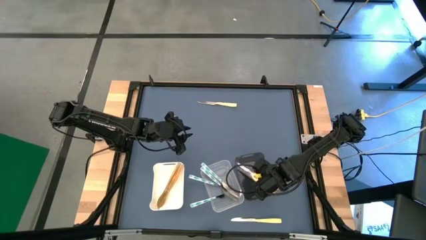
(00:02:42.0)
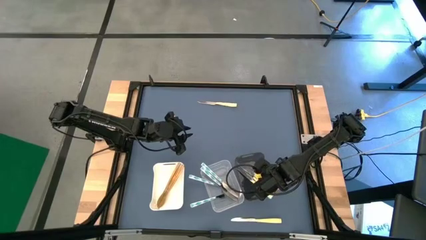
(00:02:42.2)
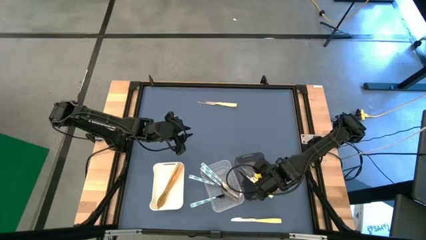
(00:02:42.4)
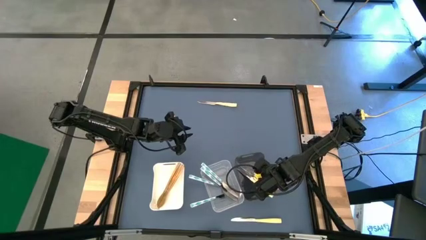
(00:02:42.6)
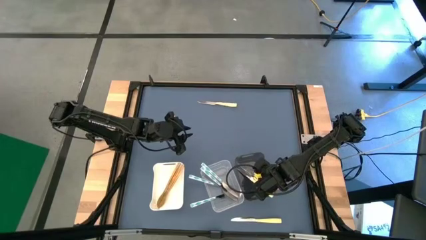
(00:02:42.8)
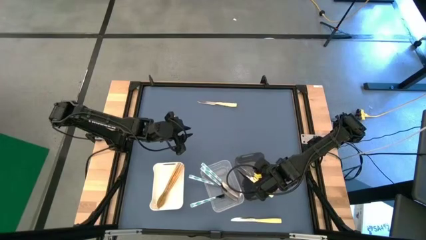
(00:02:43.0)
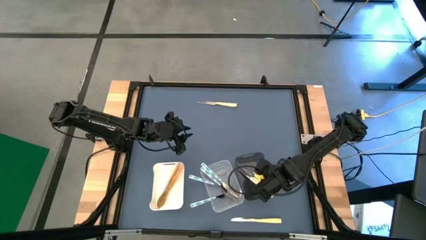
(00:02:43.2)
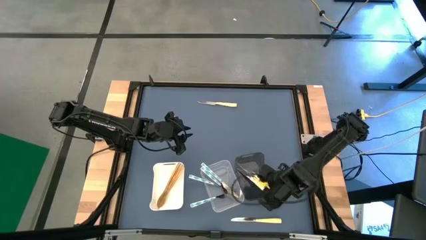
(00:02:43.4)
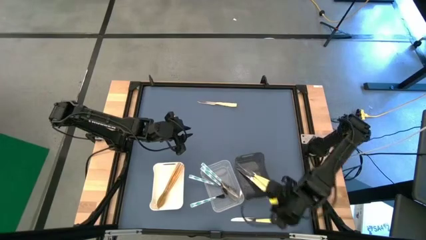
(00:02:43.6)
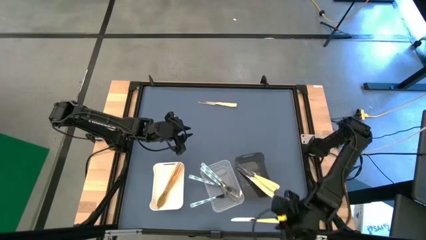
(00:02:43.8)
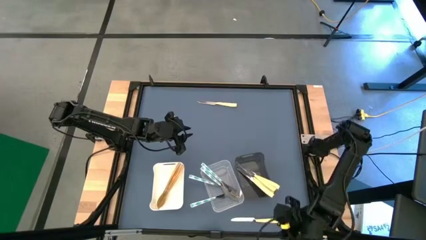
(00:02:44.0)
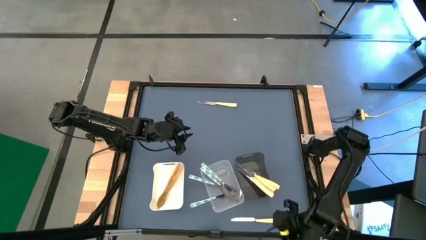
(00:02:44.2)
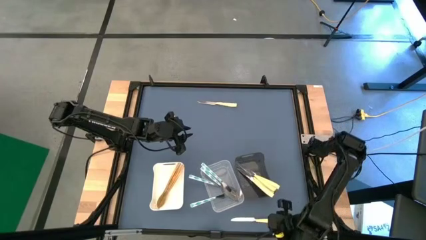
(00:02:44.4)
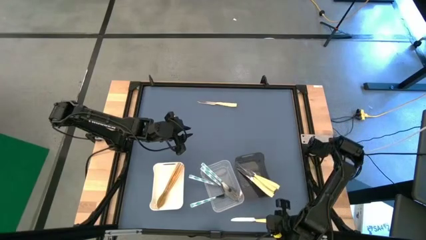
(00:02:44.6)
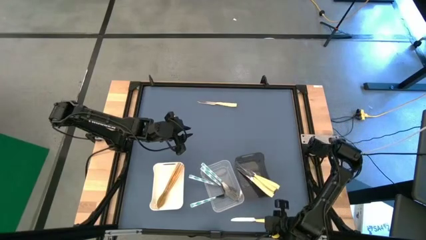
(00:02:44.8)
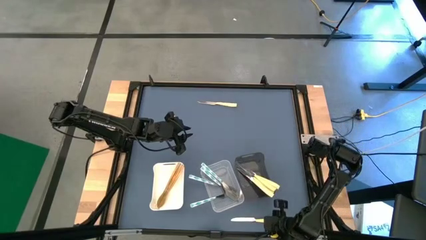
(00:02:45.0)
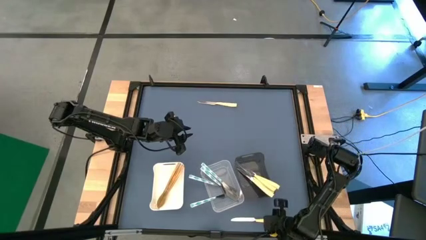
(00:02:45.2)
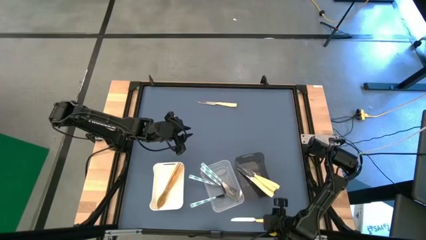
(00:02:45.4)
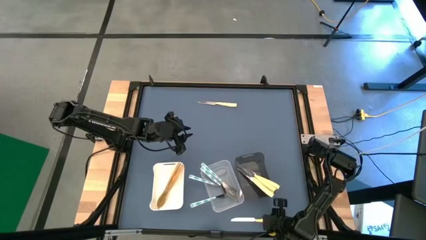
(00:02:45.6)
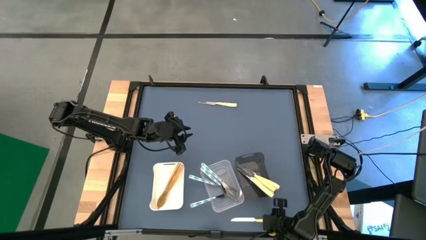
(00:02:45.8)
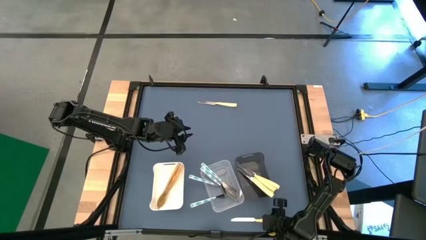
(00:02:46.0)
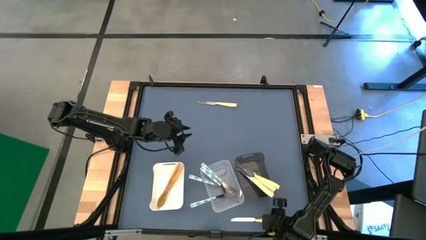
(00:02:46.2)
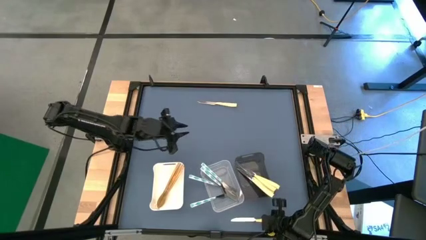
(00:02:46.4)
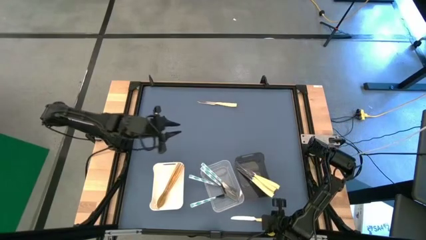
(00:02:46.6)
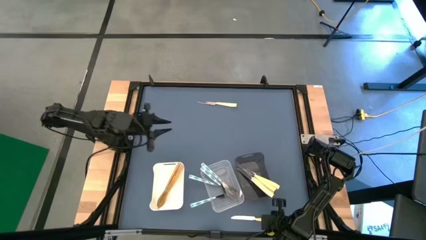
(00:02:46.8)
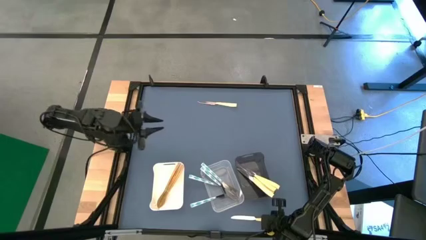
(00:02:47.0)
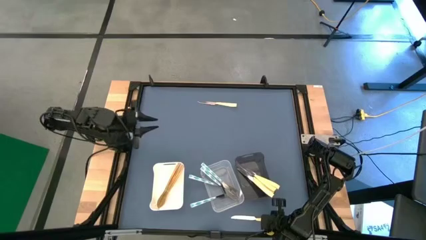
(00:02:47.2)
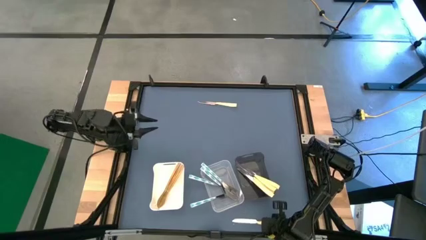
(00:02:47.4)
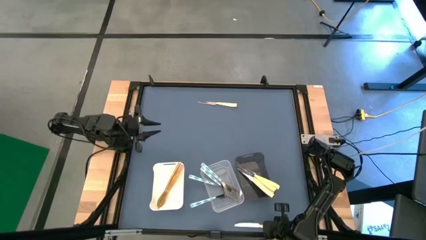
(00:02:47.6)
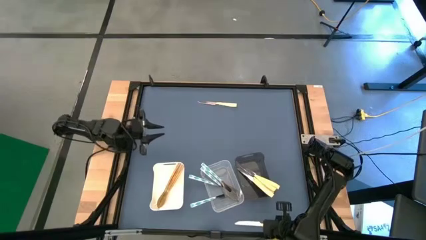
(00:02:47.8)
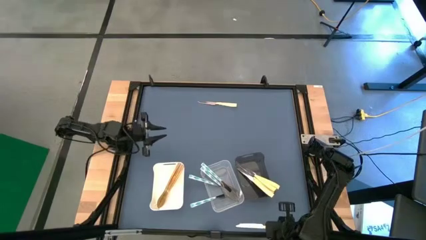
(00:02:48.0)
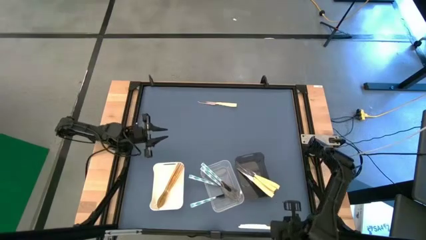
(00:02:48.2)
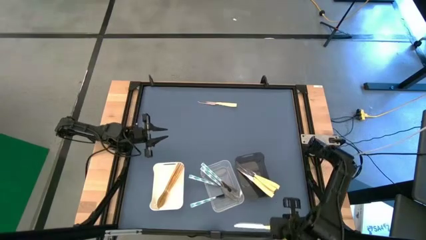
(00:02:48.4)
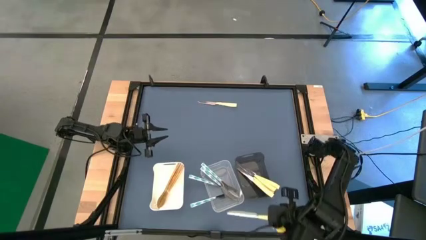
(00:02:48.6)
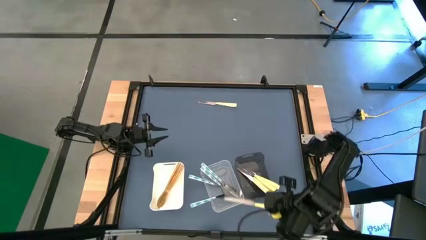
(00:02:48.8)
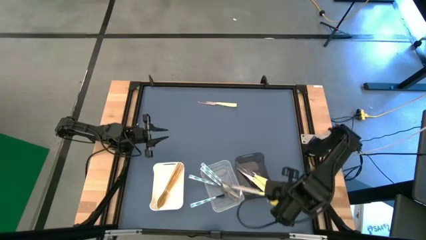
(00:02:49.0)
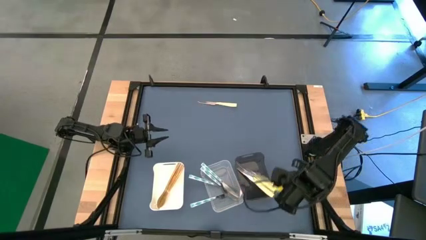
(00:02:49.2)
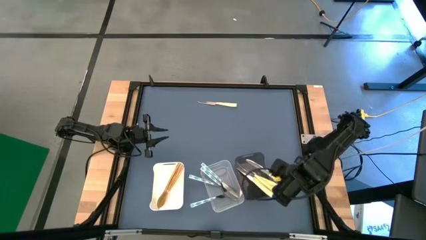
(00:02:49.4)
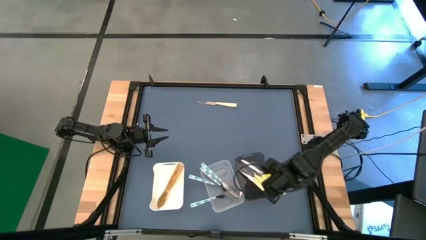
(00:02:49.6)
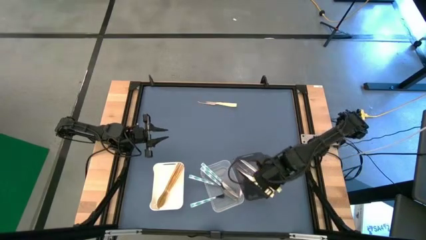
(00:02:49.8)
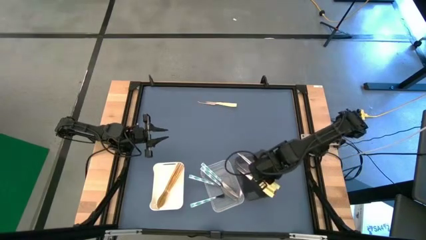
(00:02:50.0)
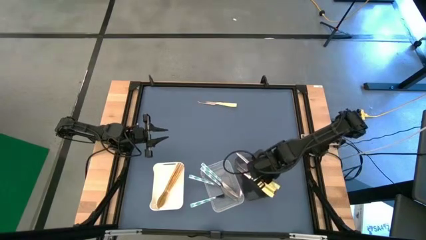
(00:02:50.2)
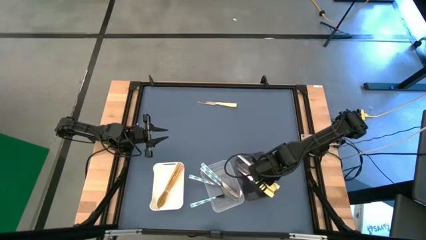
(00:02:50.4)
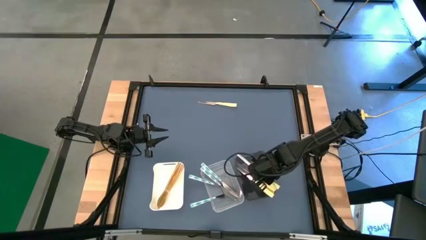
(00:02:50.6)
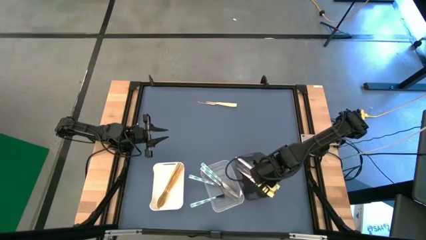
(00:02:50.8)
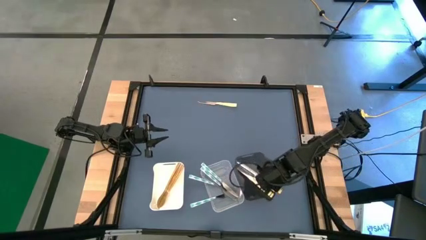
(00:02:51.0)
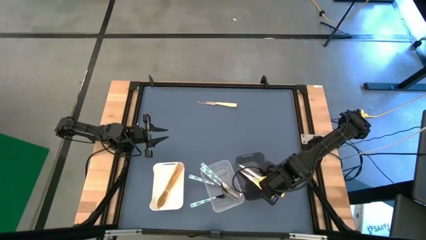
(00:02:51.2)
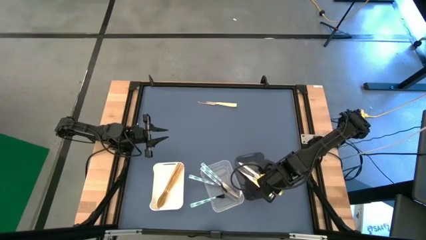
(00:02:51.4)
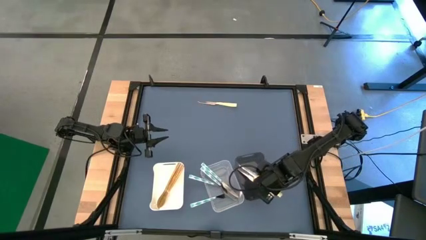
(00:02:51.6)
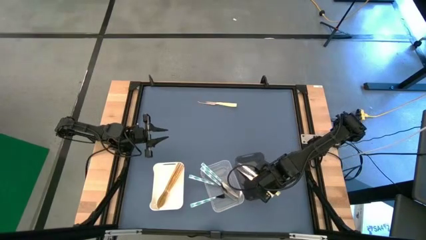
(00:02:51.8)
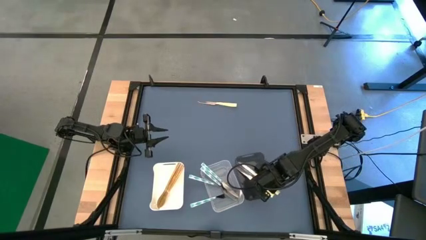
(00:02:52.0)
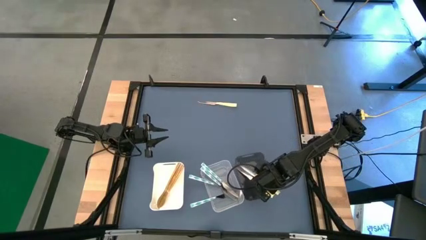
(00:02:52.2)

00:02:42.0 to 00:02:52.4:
Task: Sort silverware by color (type)
Put the yellow table knife into the black transparent bin

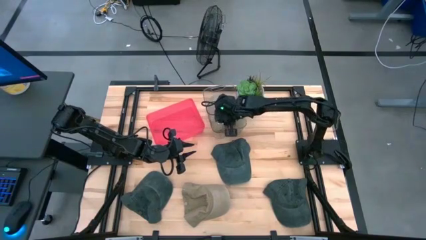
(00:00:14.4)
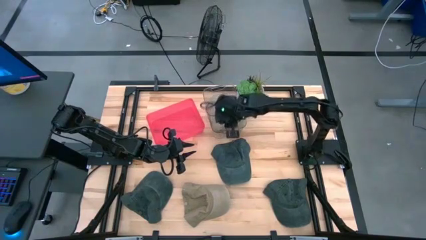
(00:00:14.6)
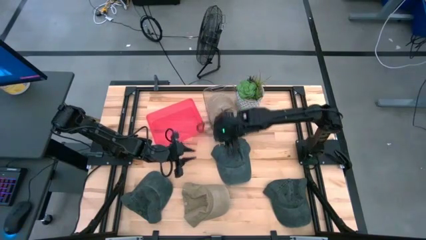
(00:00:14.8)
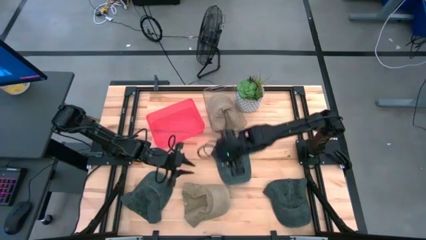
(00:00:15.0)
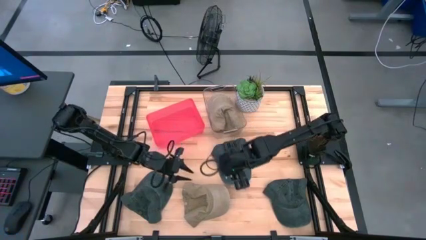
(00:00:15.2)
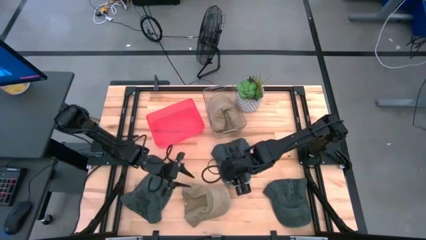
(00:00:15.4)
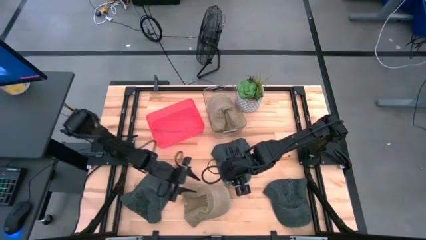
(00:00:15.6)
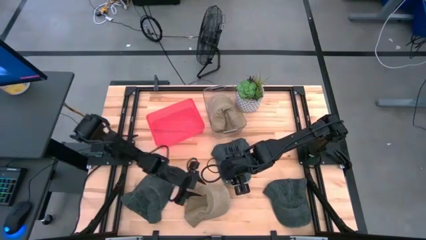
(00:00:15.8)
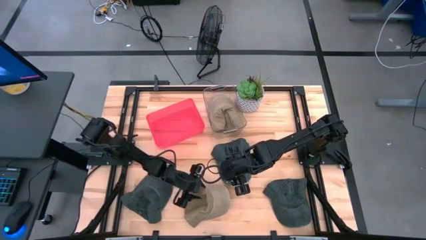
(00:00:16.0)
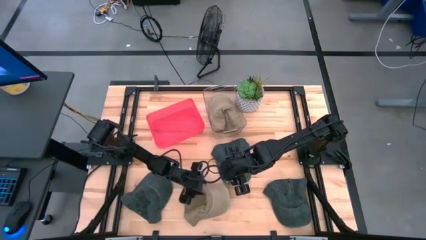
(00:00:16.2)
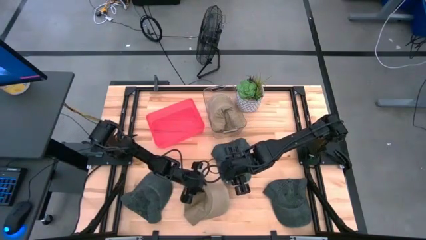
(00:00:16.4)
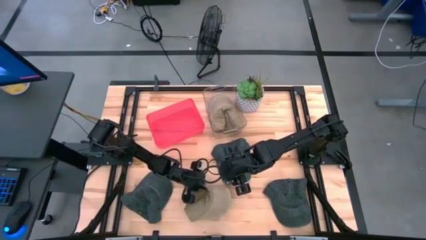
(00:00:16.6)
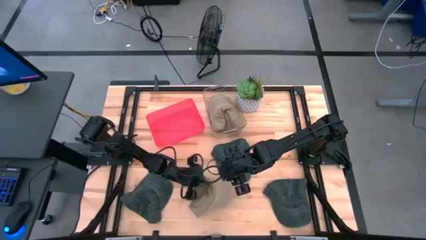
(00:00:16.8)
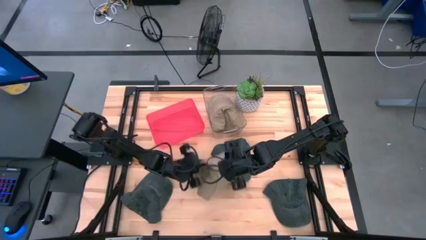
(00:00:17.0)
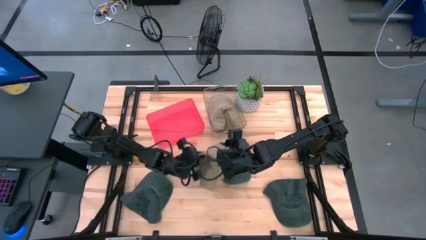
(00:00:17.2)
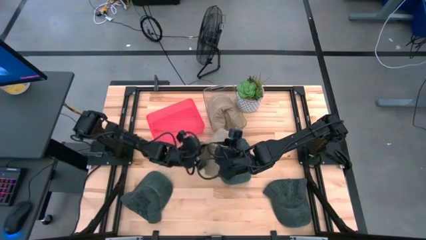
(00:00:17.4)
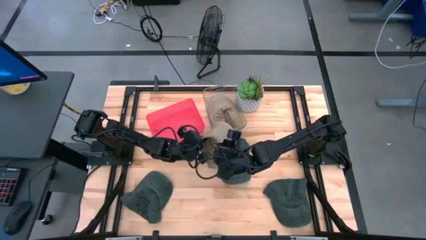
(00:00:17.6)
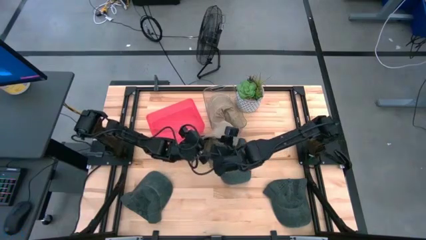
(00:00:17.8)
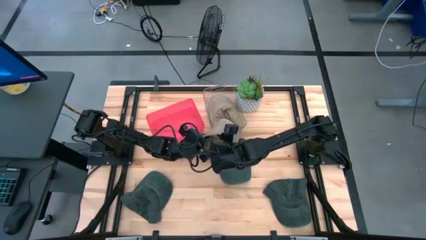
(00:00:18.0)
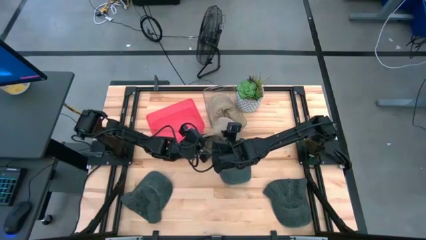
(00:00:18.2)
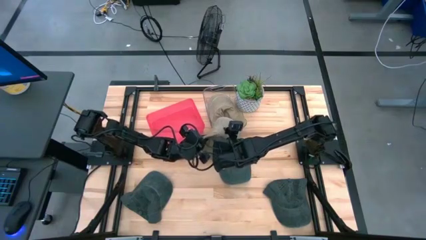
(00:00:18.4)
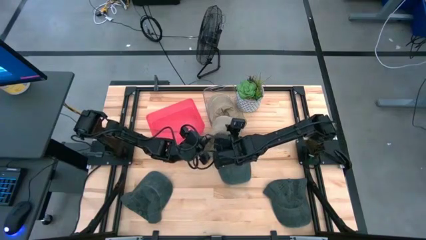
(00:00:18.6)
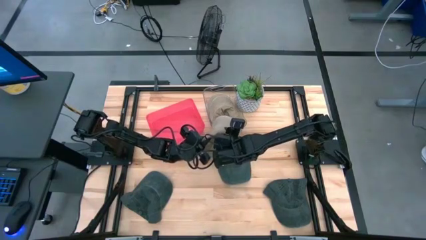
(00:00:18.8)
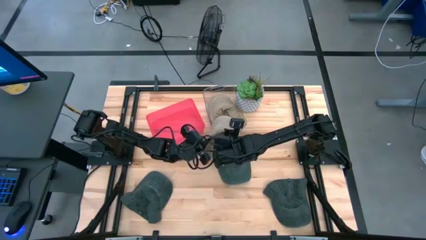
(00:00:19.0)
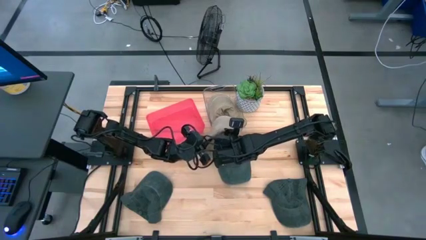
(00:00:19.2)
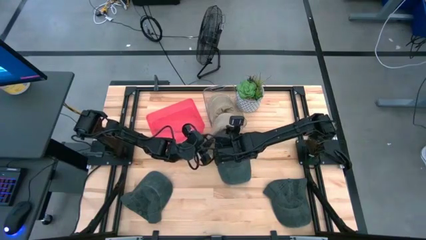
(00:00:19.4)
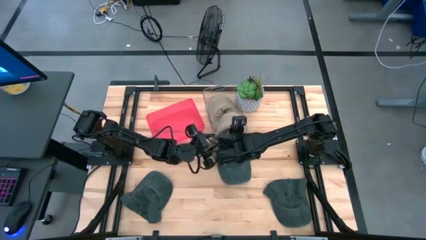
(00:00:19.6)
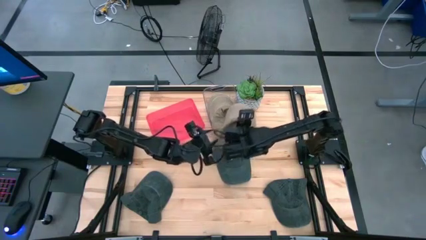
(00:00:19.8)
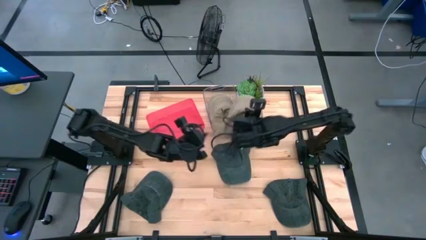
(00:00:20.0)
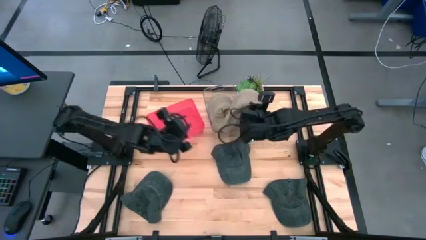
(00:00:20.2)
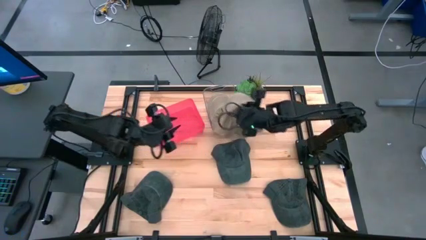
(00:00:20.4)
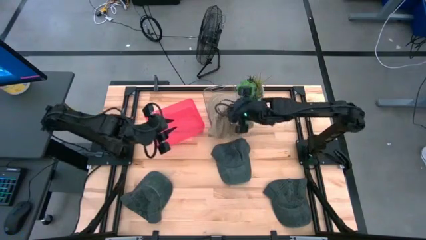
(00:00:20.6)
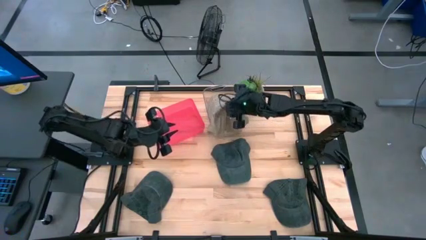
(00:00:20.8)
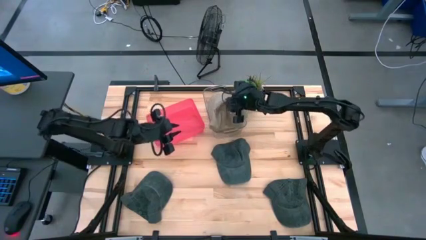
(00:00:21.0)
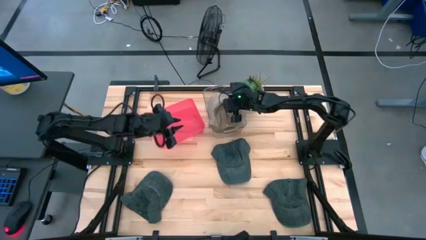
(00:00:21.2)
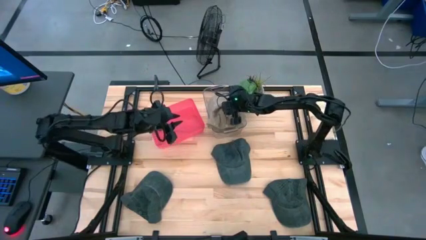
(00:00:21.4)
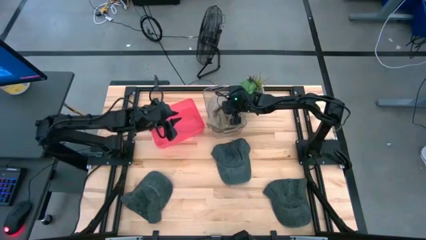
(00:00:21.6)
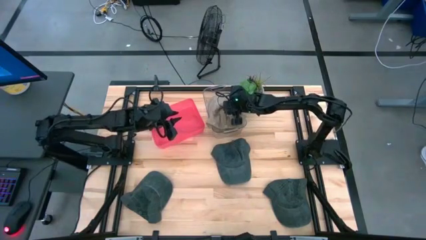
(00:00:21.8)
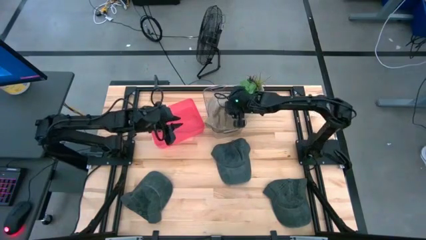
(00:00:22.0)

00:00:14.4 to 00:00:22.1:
Task: Pick & Place hat
Put the brown cap into the transparent bin
